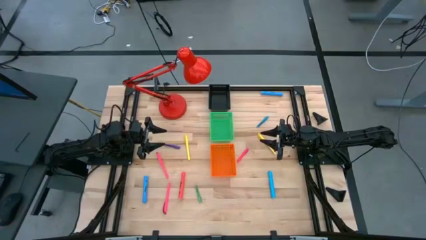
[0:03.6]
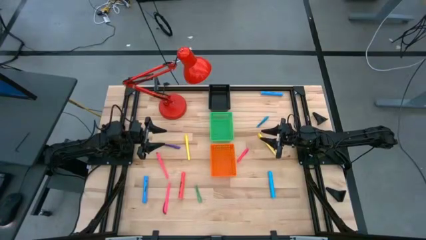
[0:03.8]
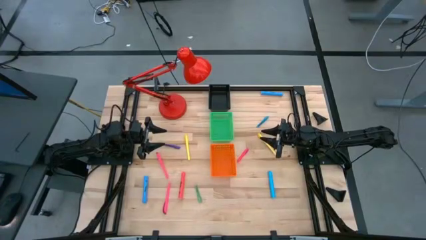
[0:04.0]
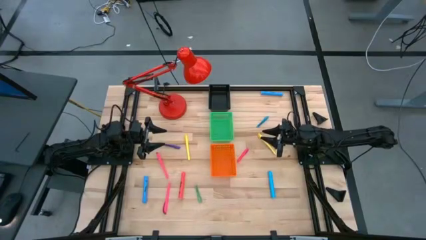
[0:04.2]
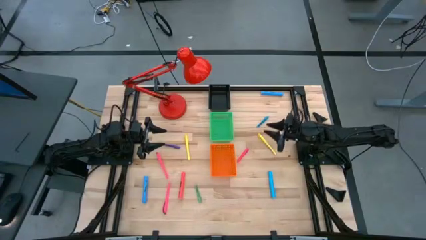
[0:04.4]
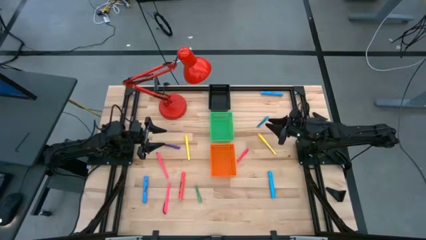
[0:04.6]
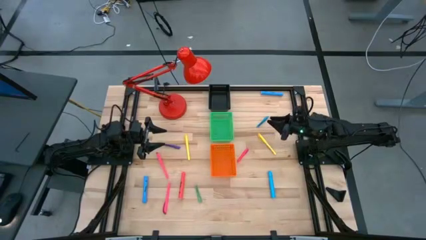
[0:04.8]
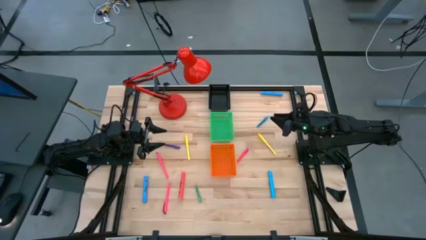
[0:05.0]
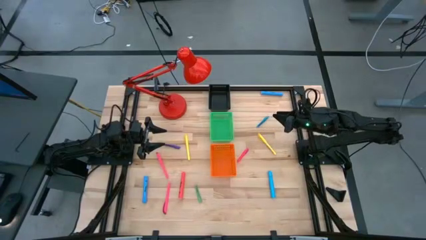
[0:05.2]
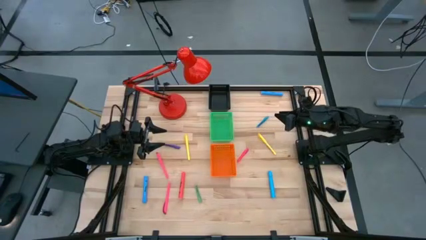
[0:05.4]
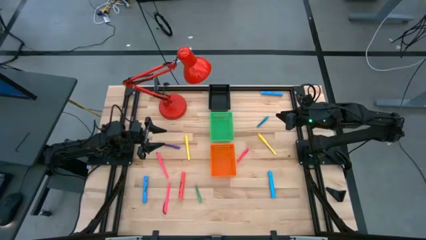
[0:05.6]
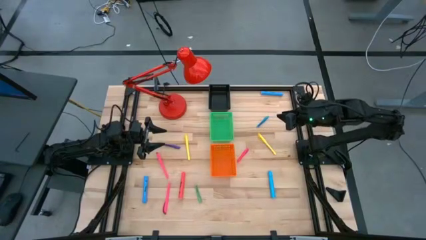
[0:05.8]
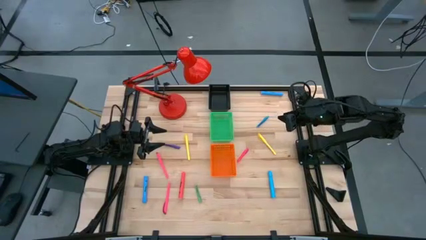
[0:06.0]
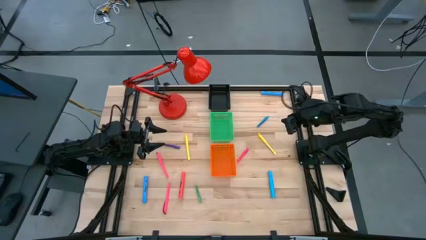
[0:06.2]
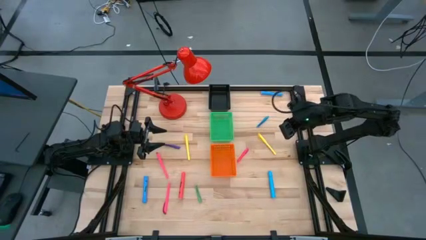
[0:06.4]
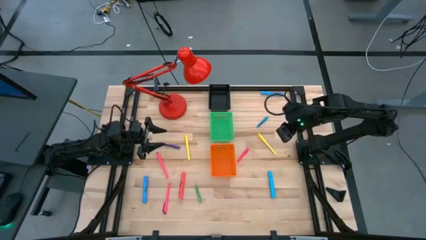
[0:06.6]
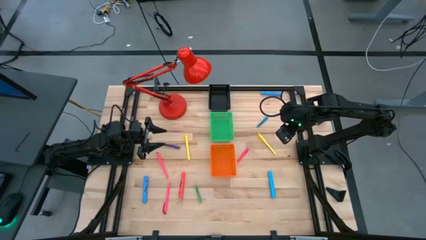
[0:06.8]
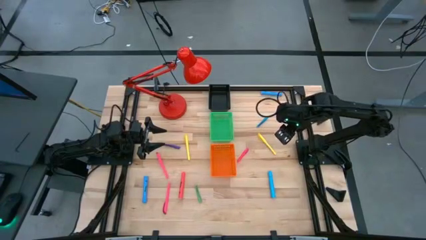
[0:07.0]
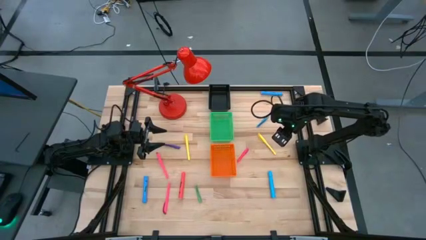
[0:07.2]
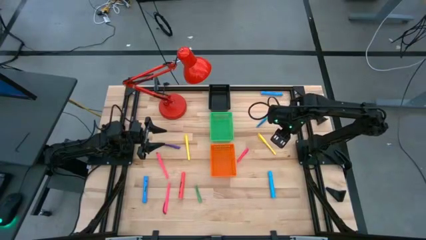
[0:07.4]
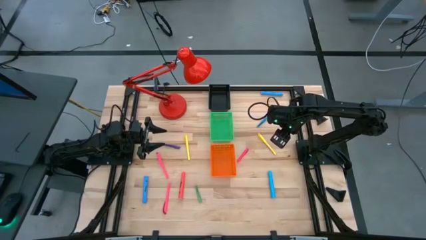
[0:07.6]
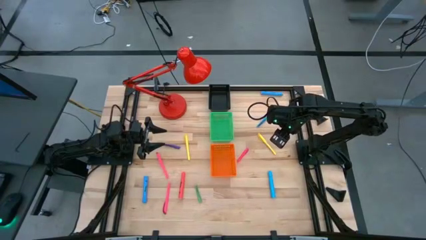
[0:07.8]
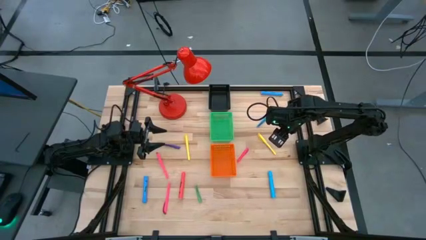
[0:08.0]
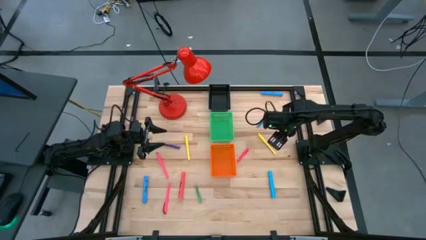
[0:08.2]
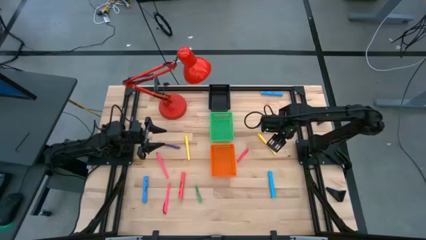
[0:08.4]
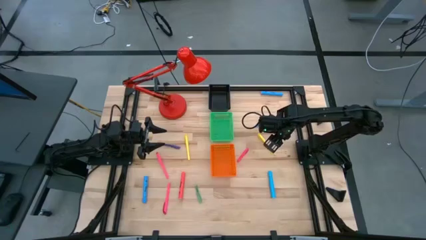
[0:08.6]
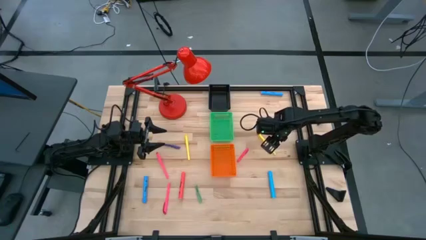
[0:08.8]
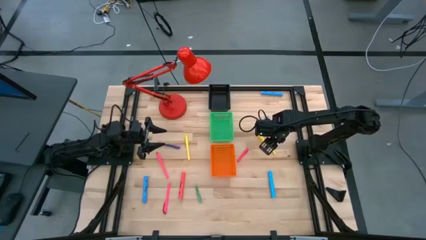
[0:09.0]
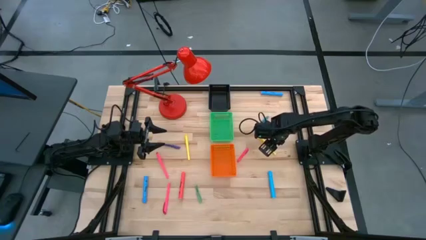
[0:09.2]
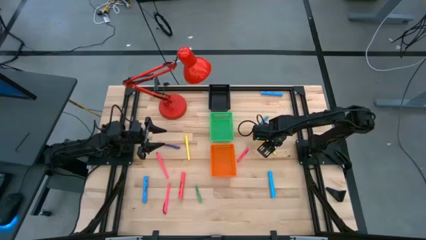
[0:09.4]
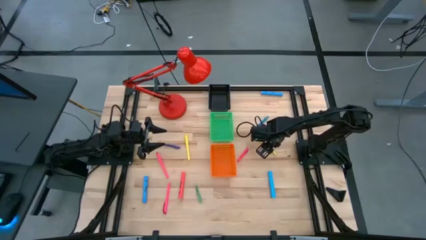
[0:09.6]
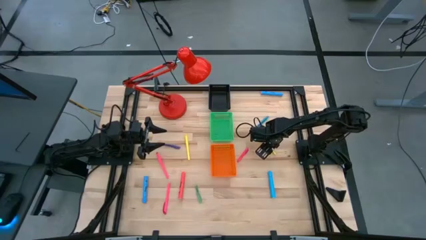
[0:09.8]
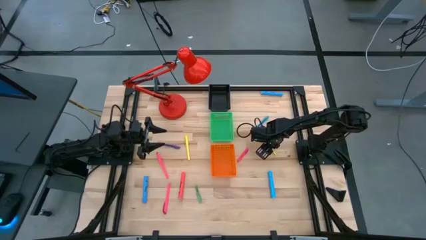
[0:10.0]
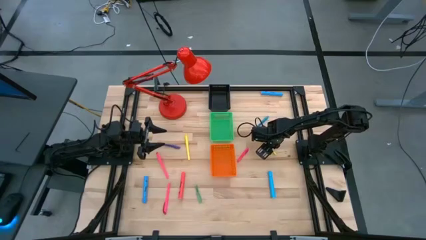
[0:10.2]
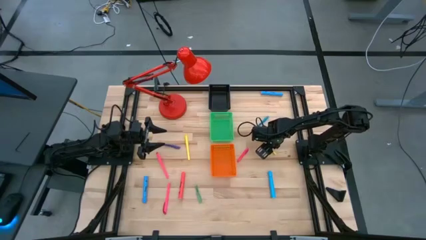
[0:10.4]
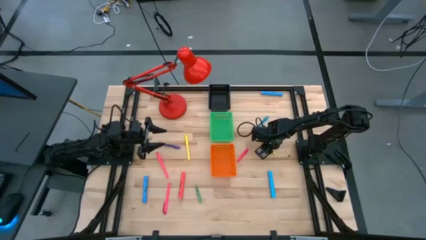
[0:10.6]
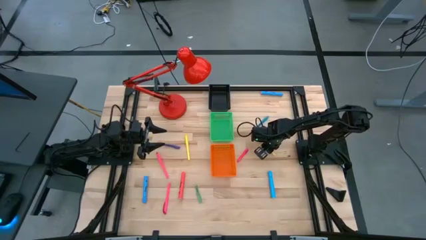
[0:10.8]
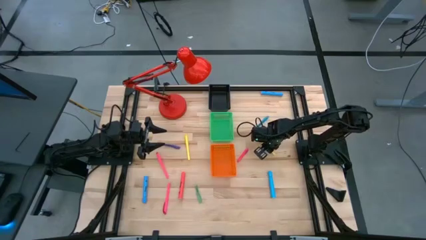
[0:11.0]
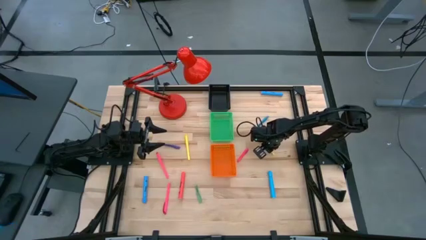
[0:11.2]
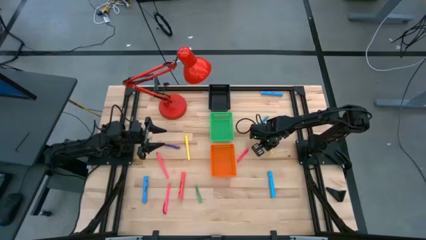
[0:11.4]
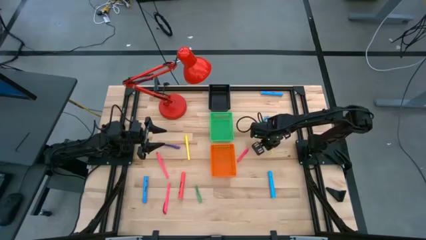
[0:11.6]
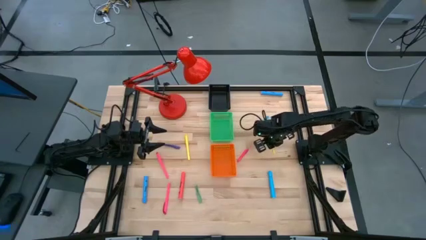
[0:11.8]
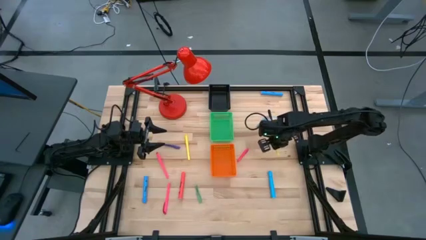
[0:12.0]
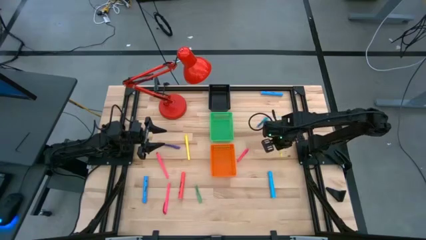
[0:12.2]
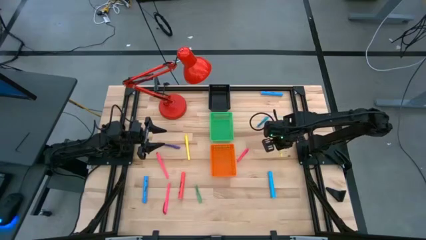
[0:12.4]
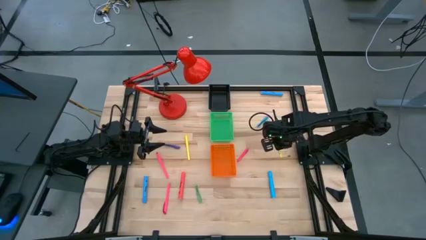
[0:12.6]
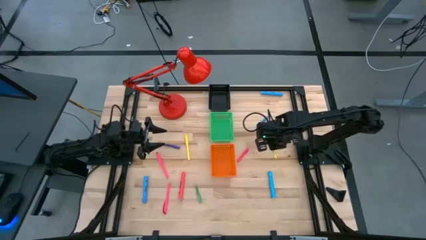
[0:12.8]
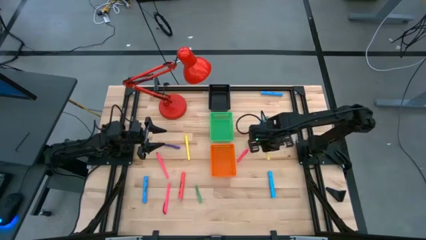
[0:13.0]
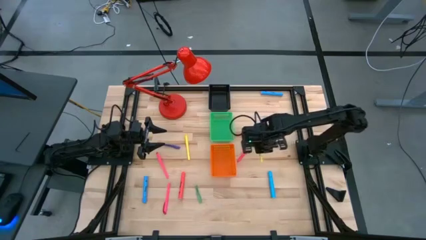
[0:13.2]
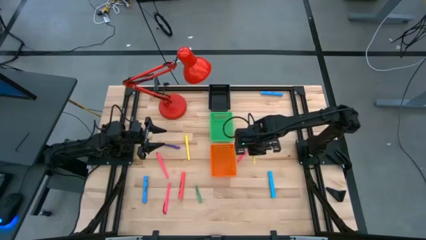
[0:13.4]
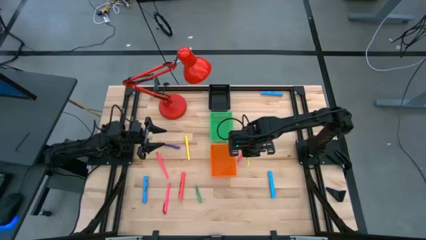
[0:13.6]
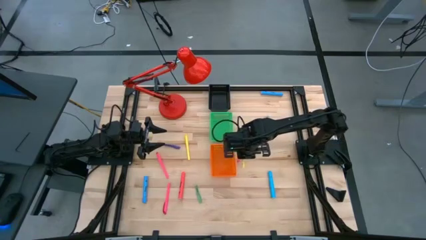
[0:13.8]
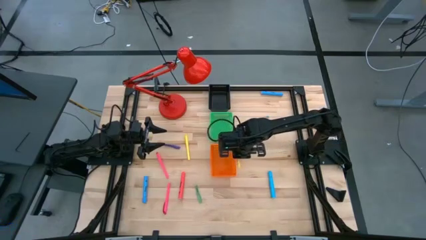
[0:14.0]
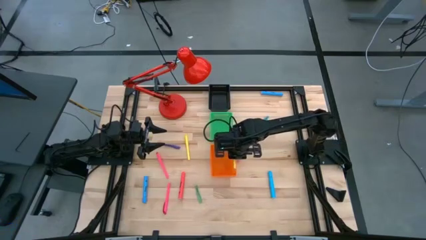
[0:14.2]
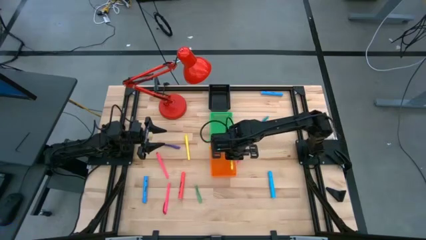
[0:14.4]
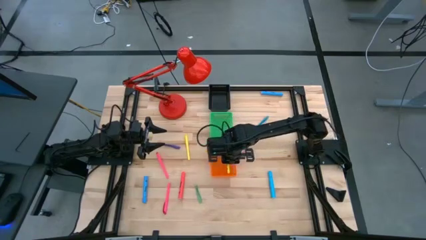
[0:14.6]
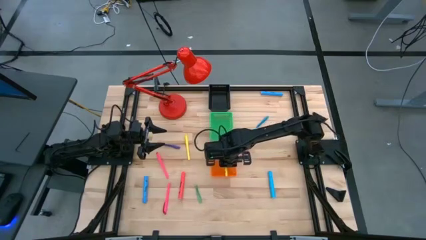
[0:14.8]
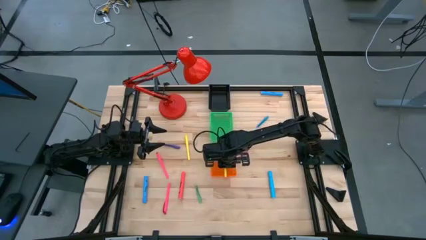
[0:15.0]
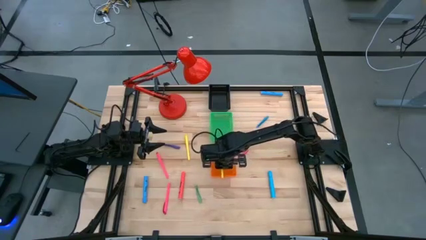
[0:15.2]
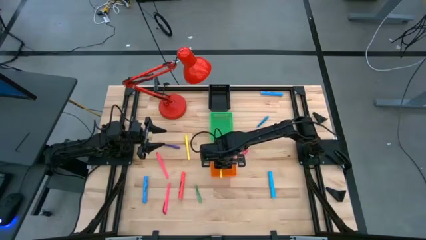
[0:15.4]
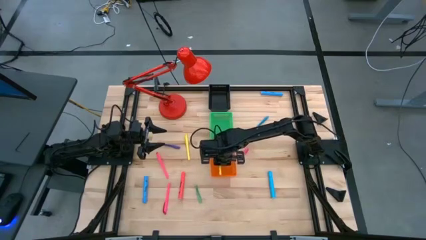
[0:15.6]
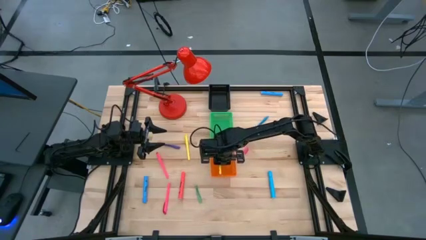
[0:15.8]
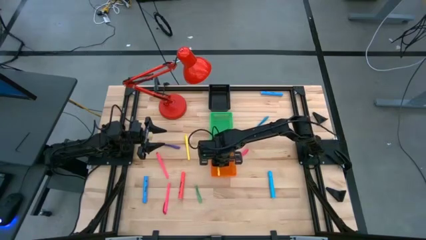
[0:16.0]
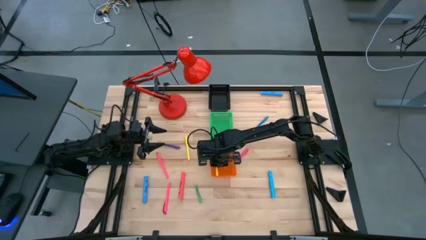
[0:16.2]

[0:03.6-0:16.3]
Task: Pick & Place Markers
Put the left yellow pen into the orange bin
